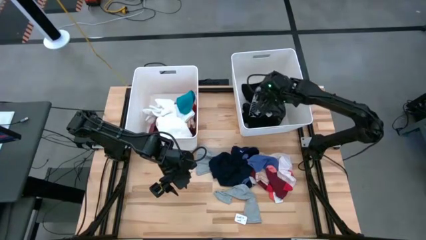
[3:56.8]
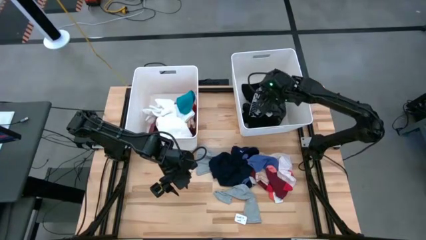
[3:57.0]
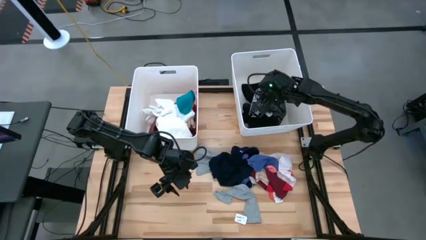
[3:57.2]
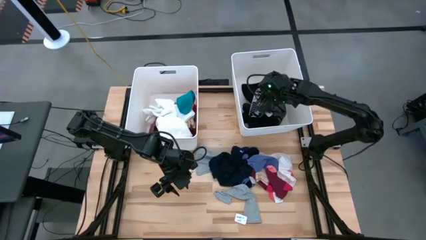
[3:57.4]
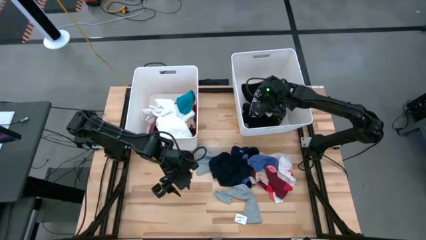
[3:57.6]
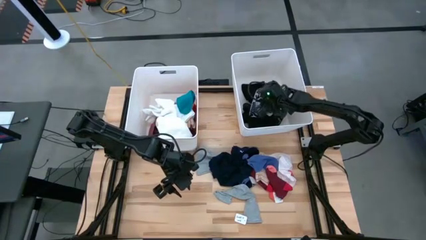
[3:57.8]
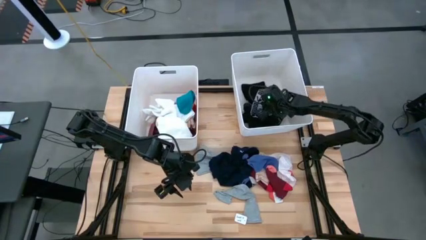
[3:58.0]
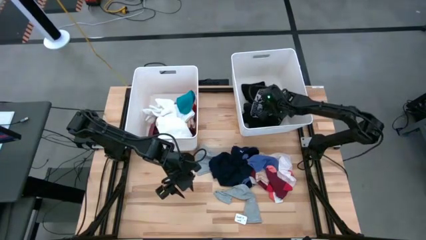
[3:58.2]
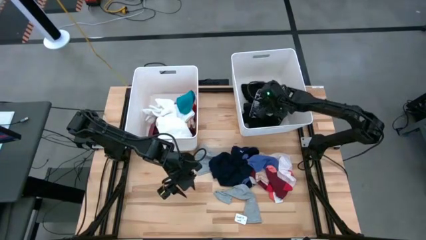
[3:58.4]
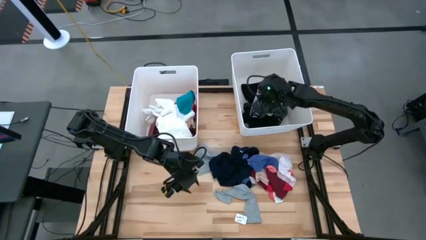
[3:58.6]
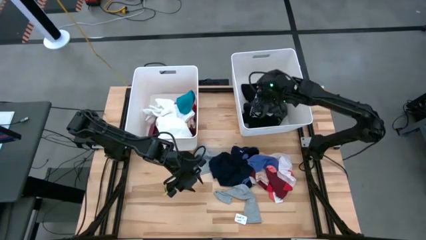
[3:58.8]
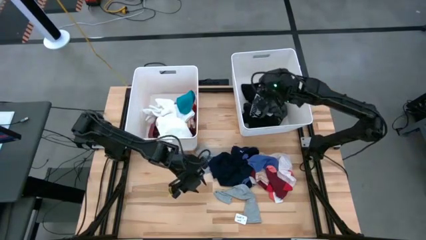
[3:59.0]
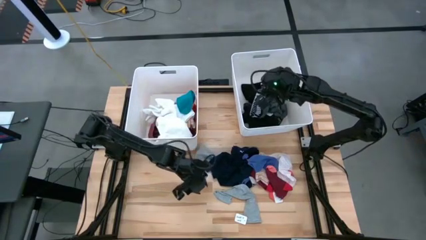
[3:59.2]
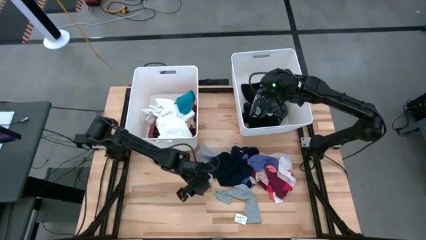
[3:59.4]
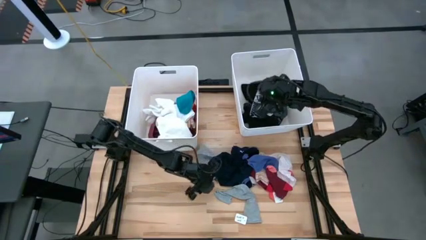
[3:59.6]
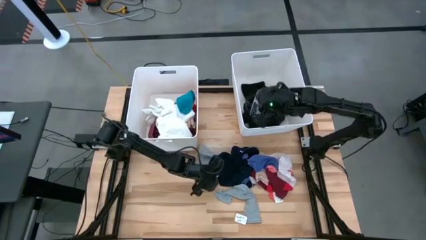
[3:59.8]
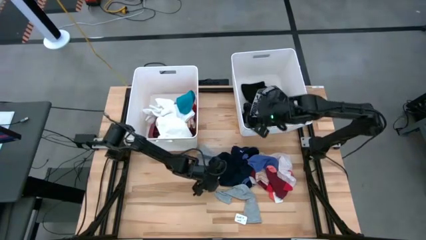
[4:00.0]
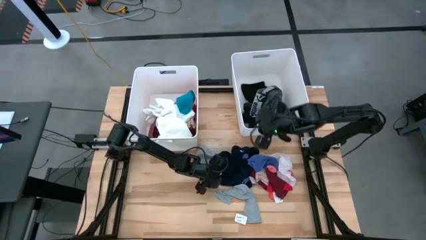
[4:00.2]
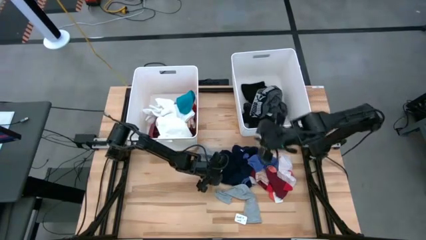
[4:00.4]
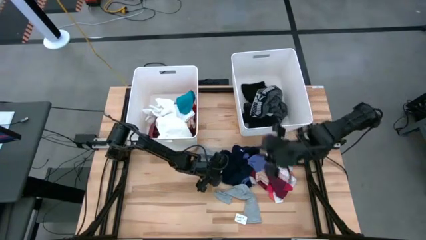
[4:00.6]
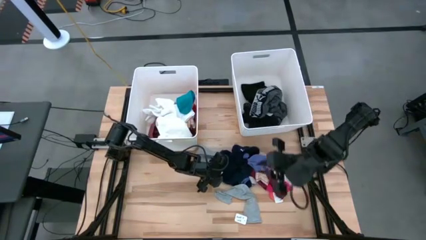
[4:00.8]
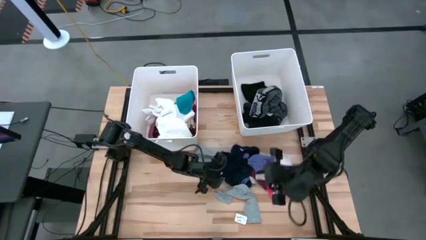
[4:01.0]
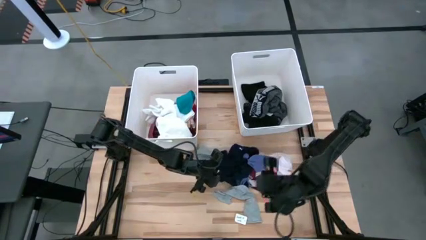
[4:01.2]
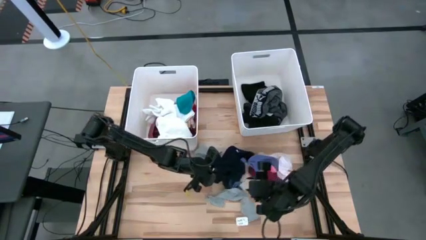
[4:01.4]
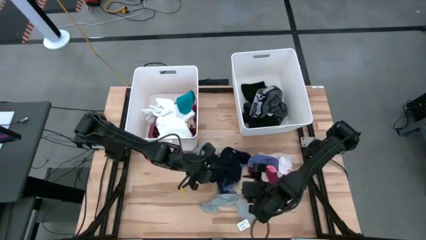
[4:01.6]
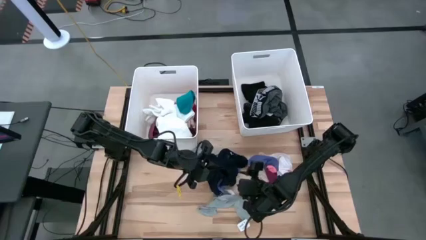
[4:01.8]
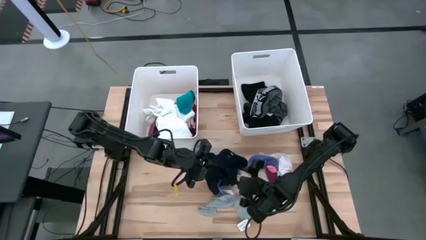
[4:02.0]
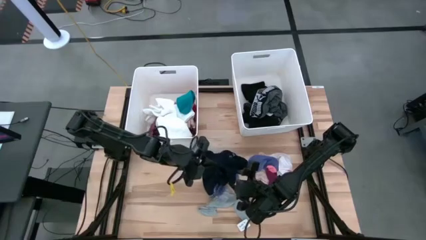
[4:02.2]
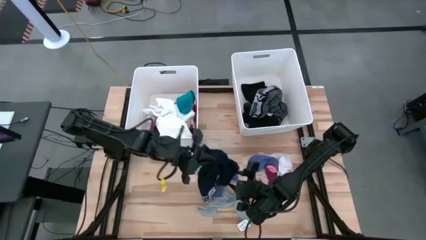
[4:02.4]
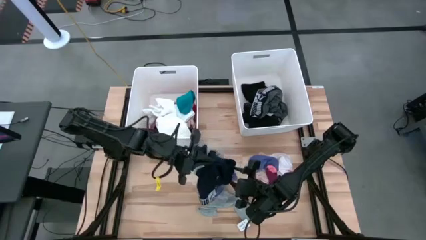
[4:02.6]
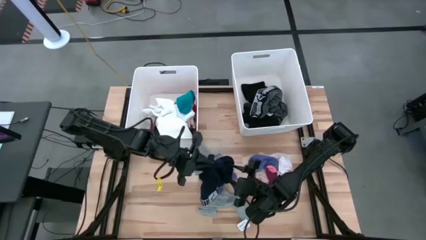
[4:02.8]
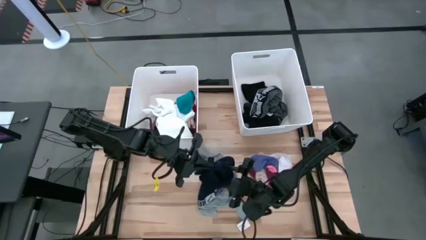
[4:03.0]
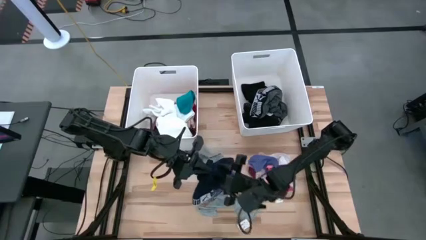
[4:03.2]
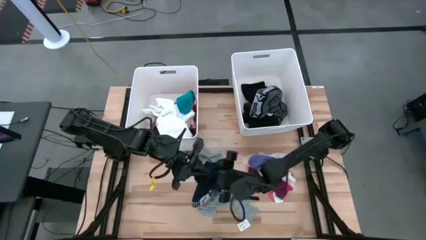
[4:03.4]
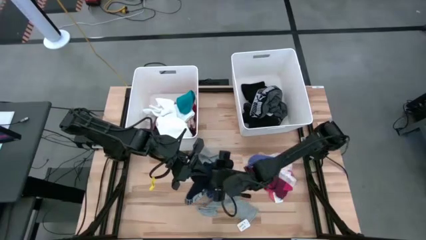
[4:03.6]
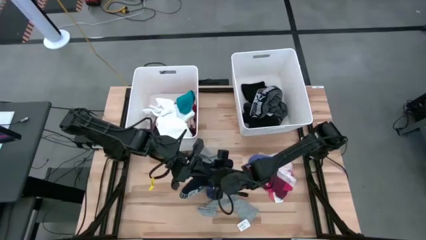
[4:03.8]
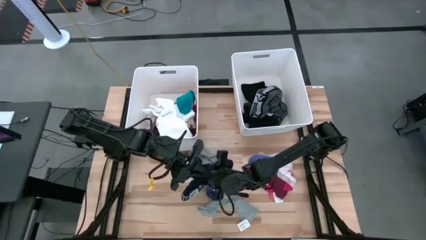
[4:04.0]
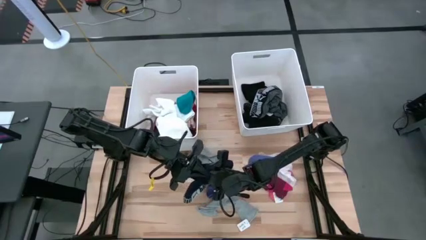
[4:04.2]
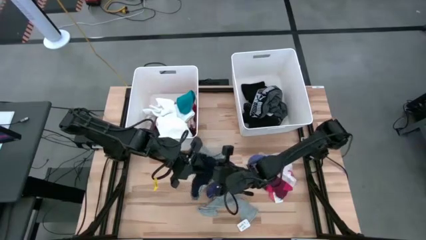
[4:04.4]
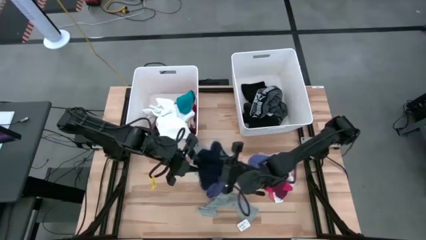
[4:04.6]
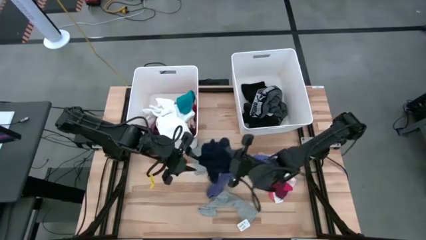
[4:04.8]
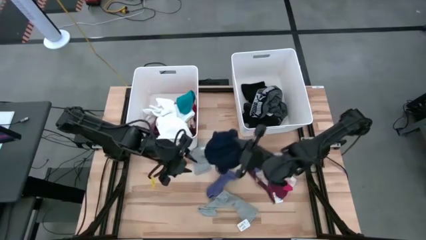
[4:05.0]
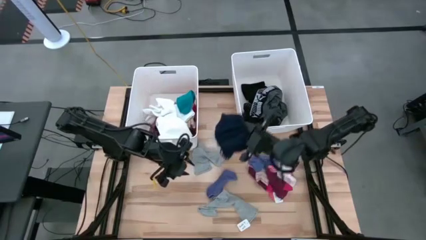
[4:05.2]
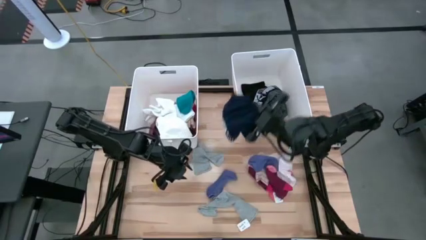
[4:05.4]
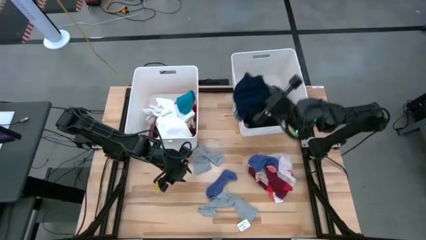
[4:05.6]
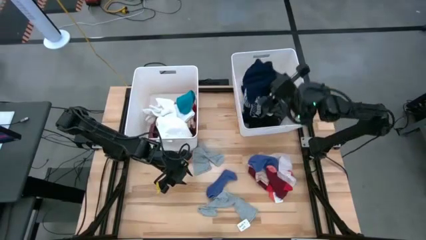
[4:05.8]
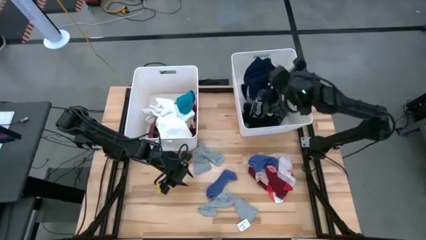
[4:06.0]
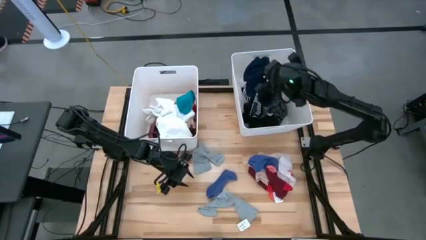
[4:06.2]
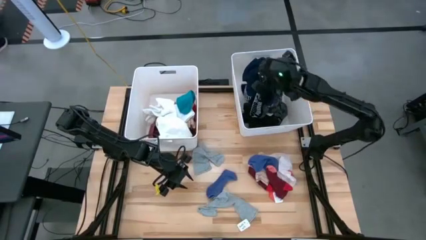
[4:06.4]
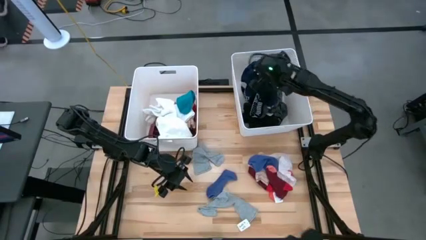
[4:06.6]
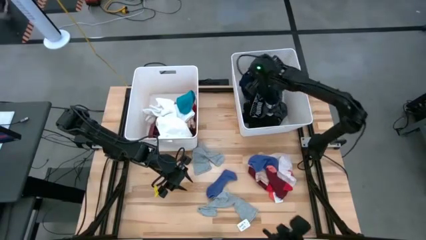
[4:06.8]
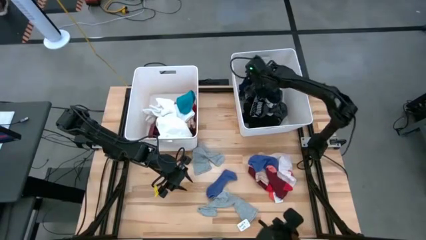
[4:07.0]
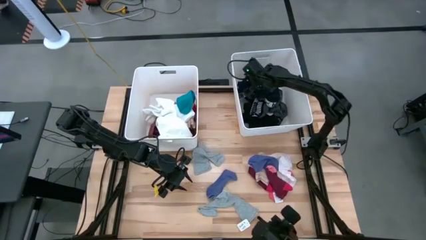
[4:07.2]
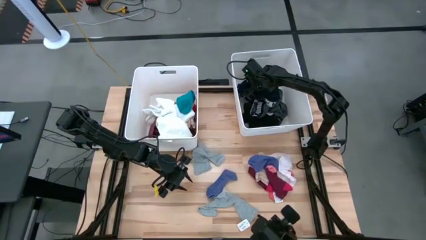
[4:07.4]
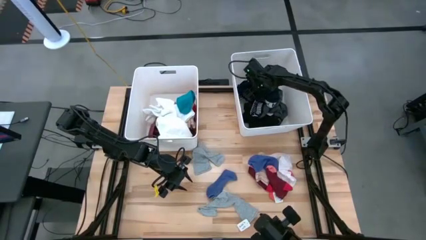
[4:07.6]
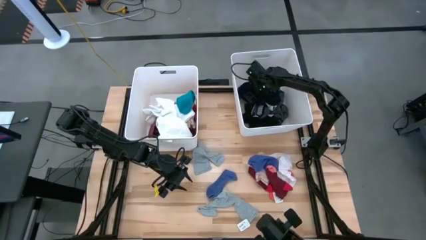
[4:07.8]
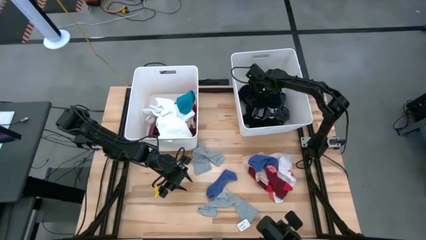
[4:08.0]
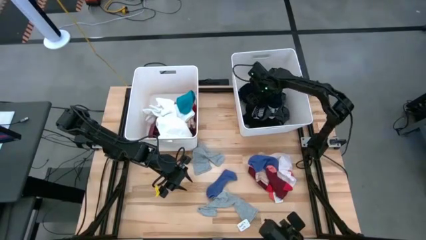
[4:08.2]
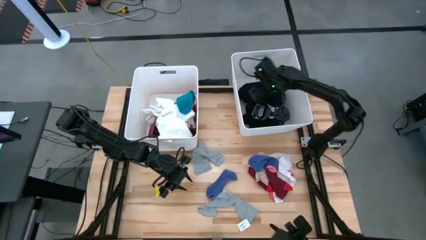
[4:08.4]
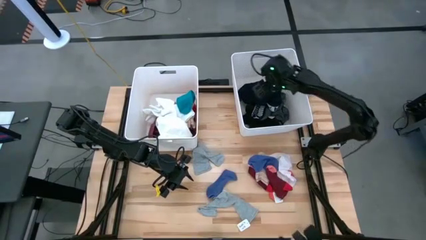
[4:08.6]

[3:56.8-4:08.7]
Task: Sort clothes
Put the blue underwear into the right white bin
